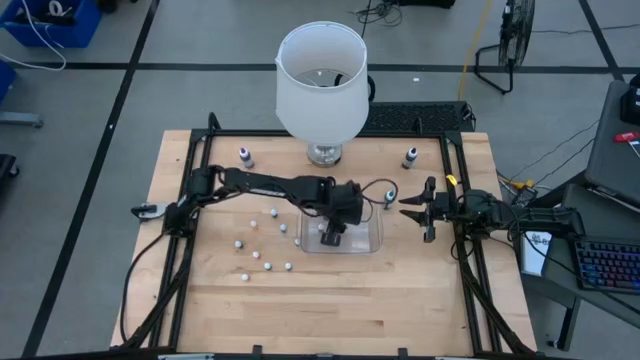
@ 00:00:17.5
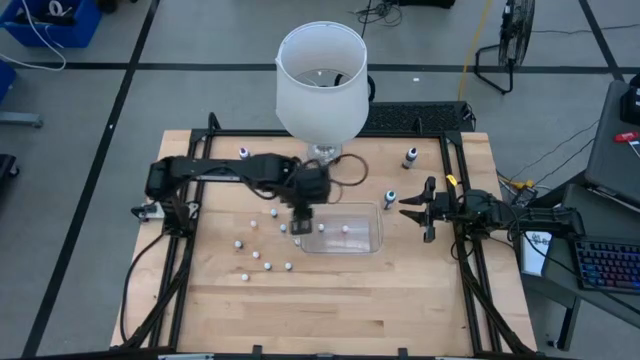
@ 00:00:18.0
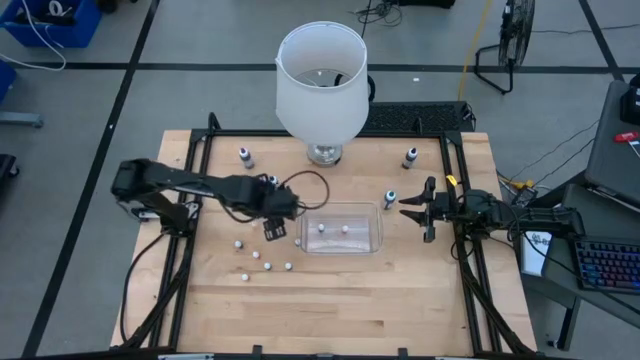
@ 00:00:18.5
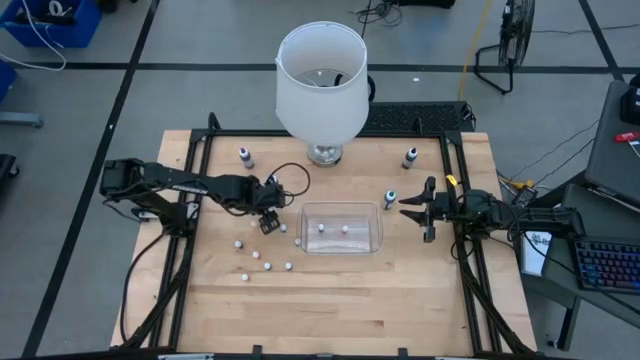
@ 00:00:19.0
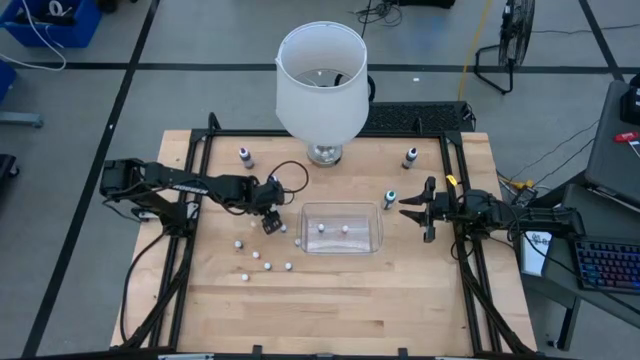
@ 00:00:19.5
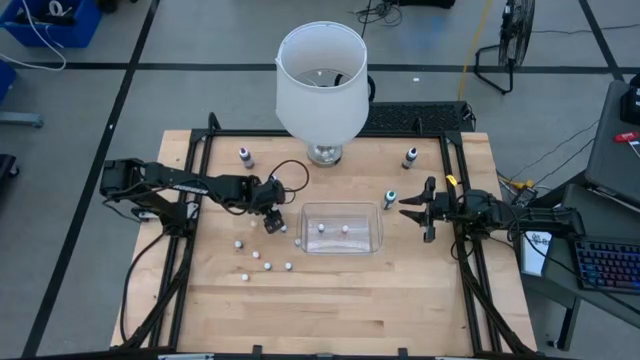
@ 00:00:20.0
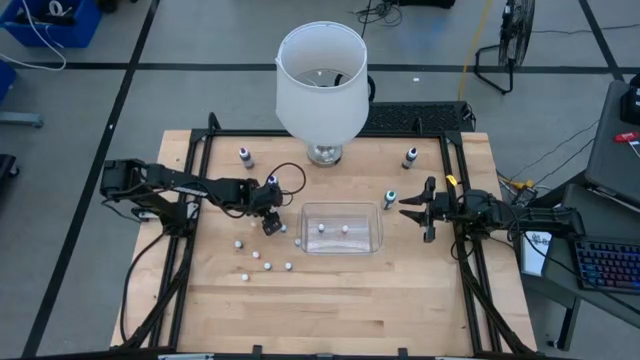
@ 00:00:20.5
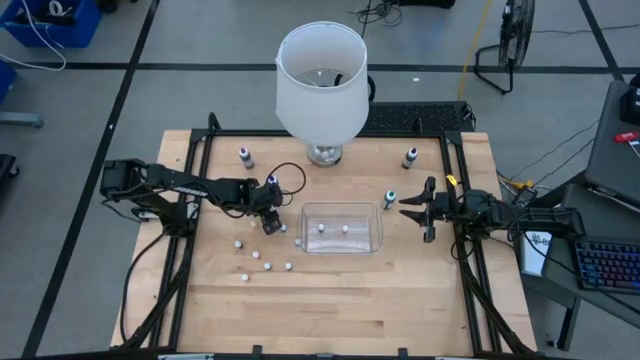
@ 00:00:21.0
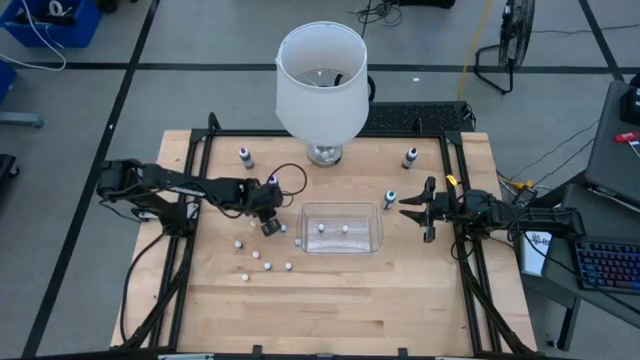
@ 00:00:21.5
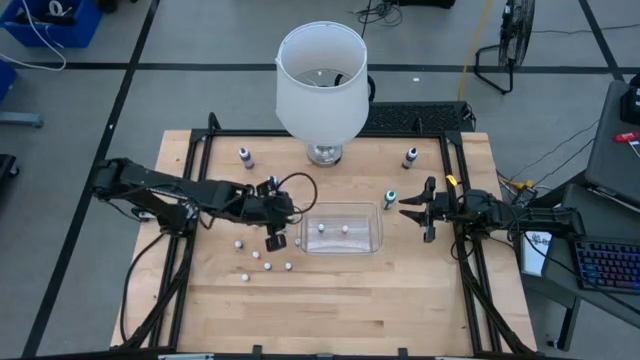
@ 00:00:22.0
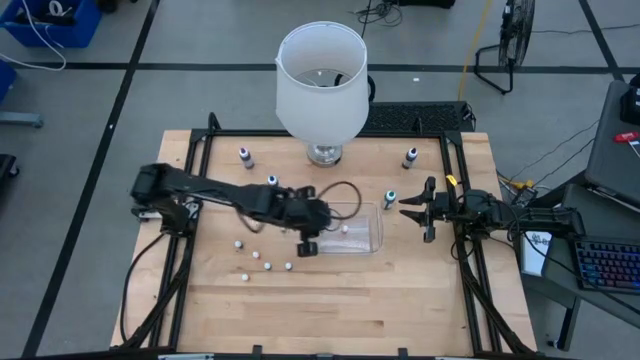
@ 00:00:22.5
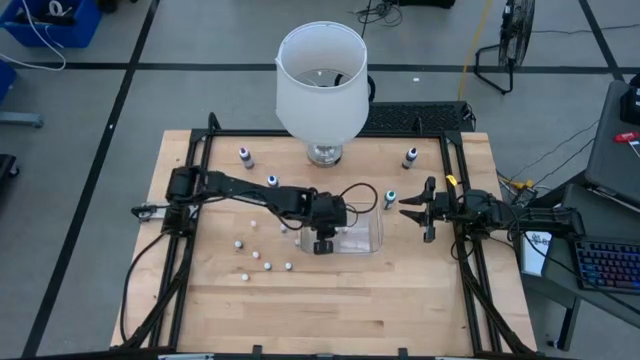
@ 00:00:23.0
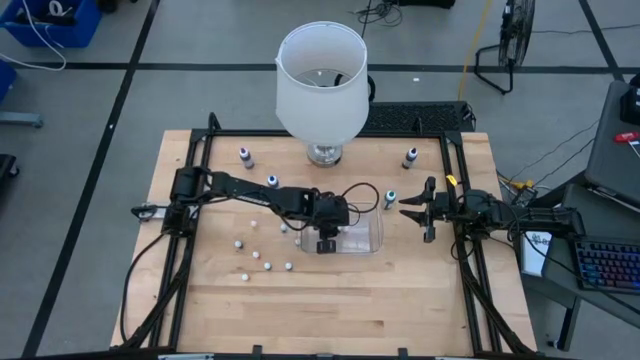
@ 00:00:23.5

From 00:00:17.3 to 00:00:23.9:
Task: Pick & Place food coloring
Put the small blue food coloring bottle into the transparent bin

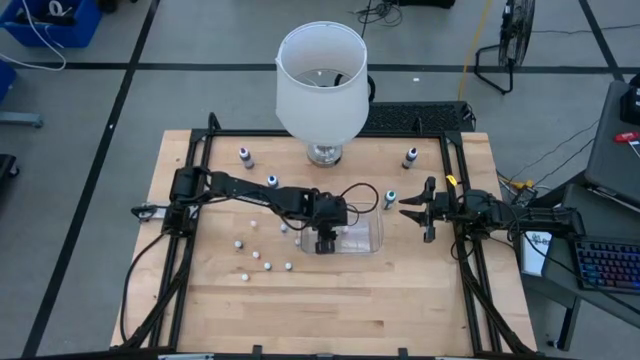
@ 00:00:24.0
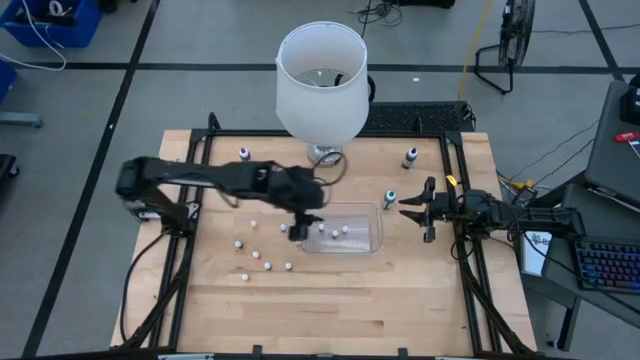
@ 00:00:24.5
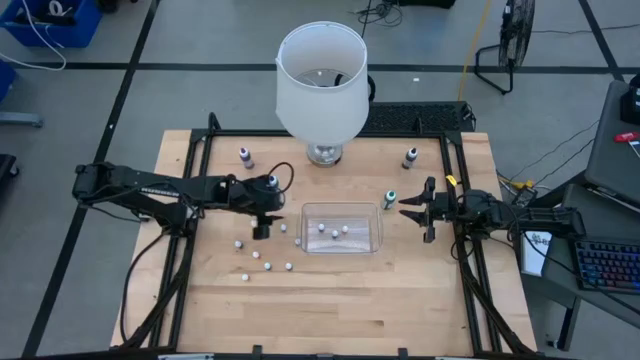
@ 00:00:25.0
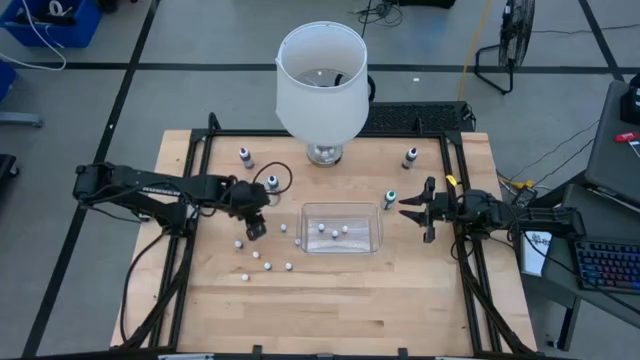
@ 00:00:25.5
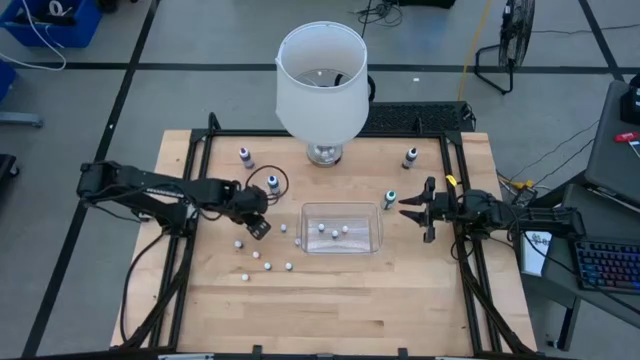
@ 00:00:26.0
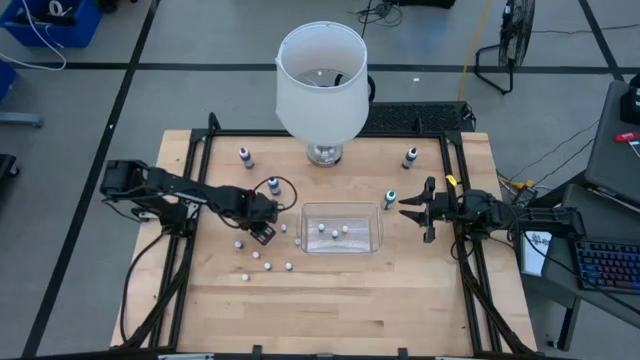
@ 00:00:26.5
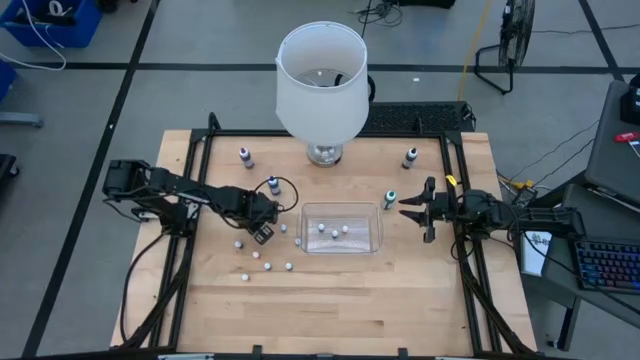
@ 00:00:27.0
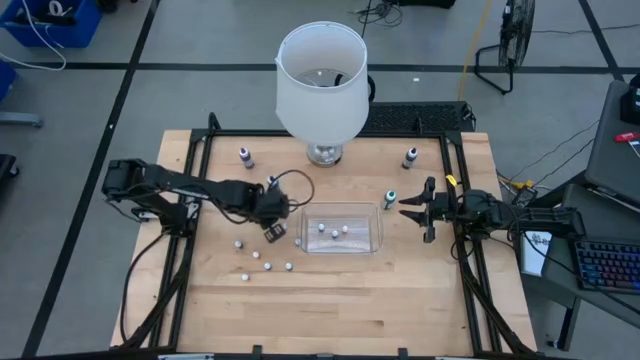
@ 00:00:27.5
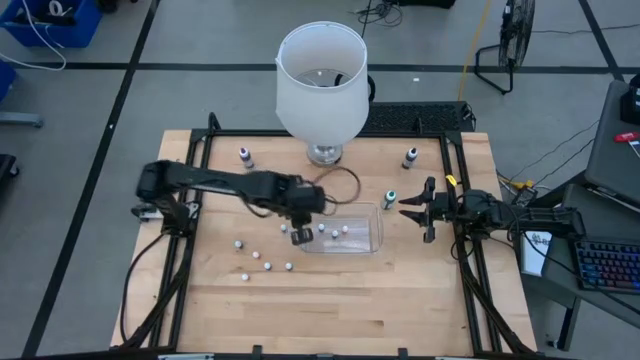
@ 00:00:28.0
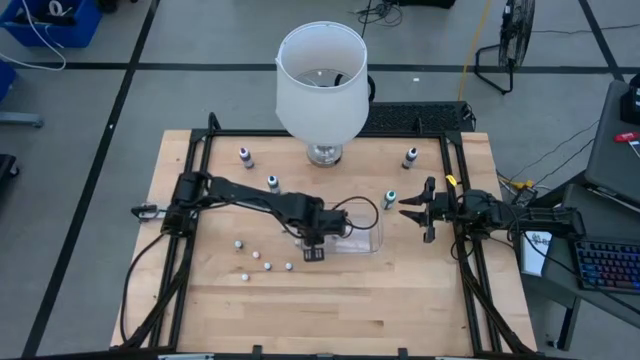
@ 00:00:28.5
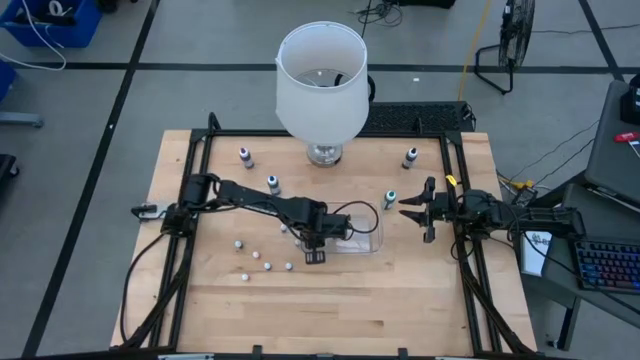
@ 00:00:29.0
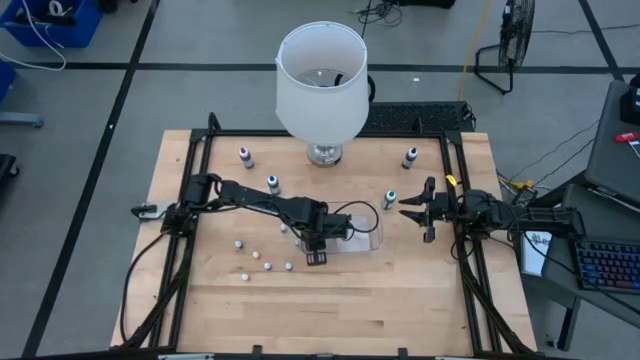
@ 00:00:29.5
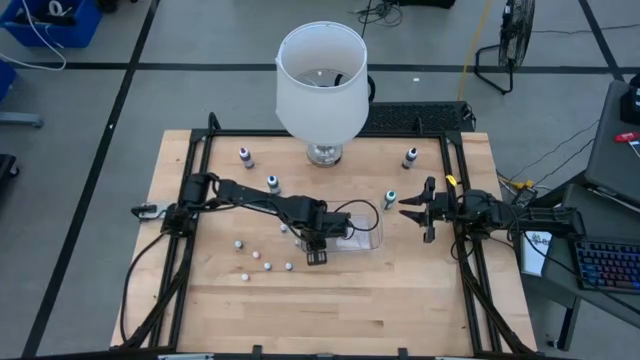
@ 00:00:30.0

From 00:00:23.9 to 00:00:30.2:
Put the yellow food coloring bottle into the transparent bin

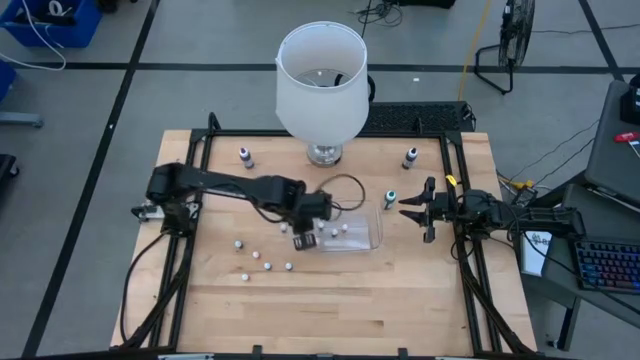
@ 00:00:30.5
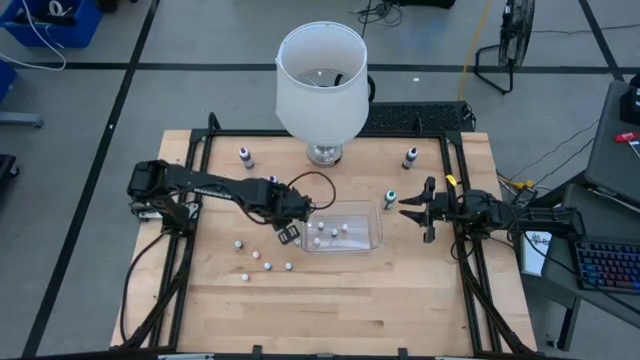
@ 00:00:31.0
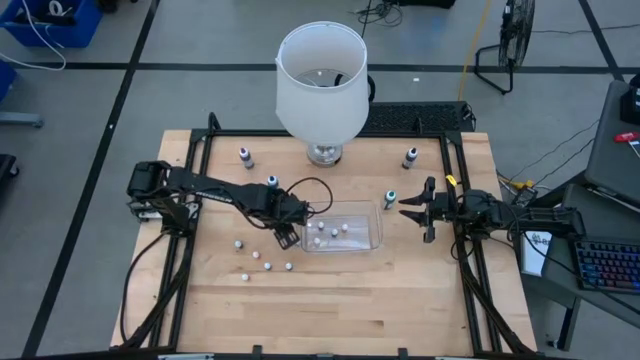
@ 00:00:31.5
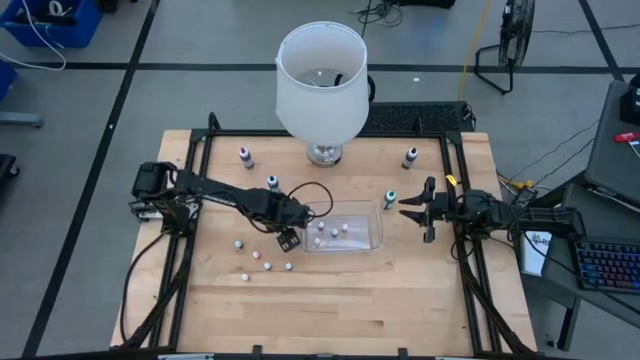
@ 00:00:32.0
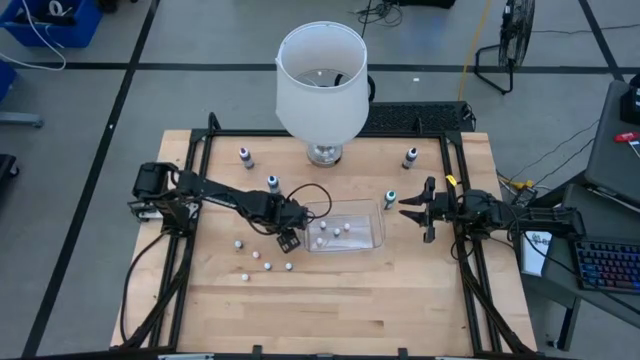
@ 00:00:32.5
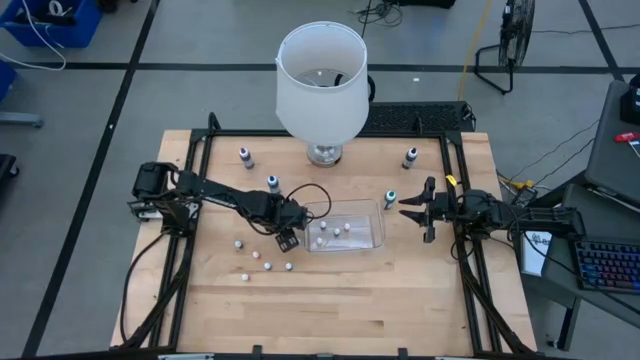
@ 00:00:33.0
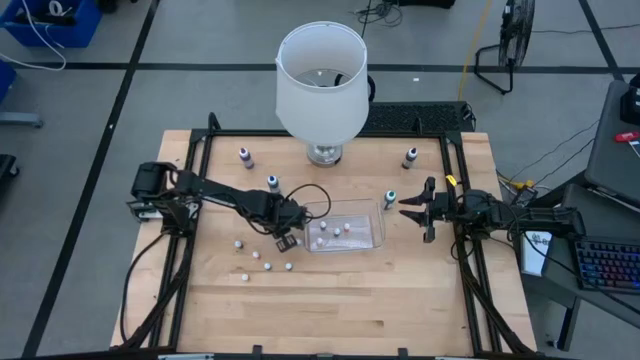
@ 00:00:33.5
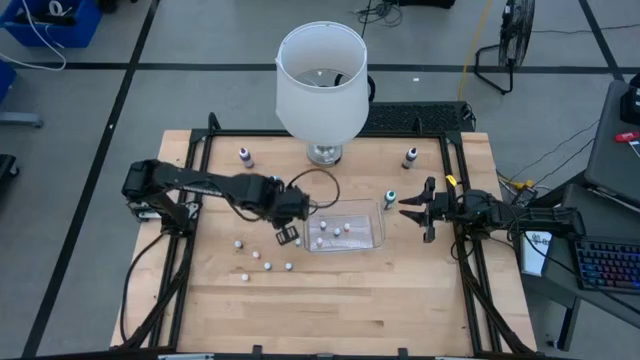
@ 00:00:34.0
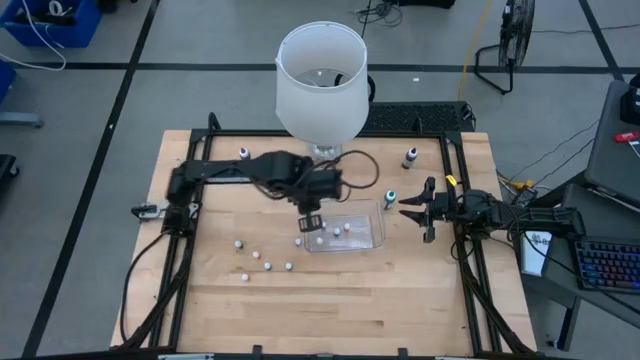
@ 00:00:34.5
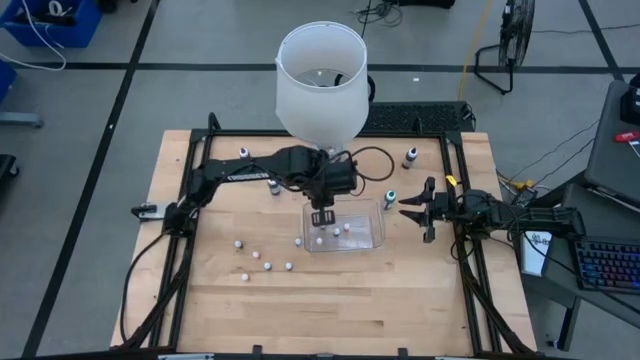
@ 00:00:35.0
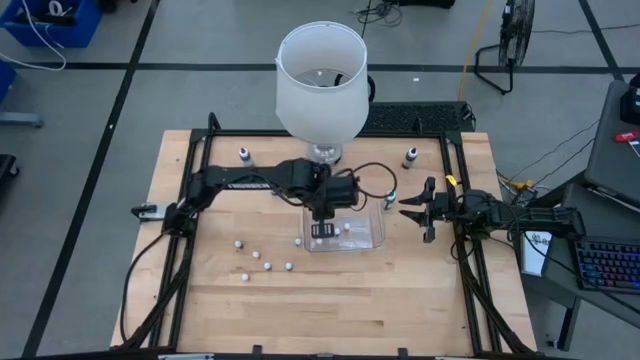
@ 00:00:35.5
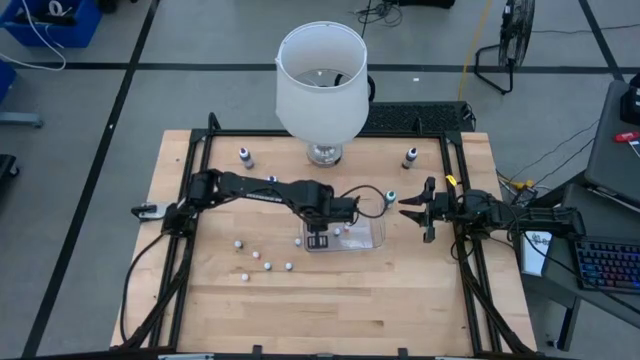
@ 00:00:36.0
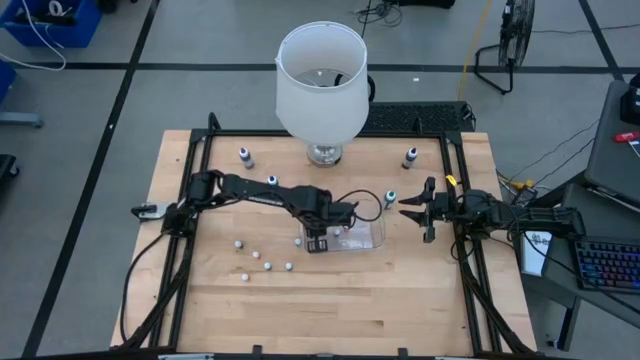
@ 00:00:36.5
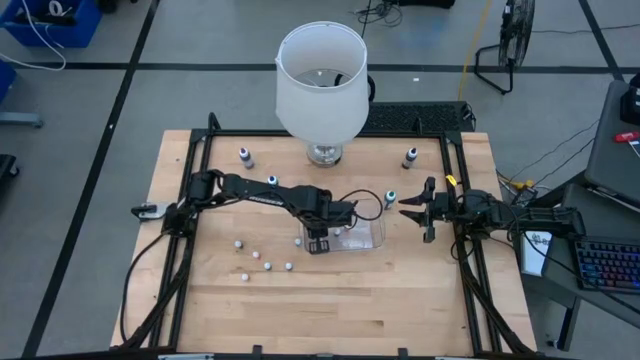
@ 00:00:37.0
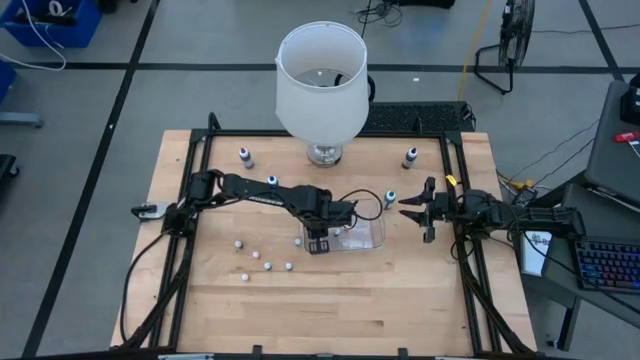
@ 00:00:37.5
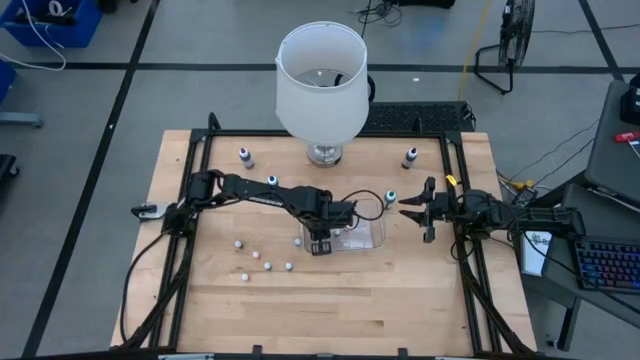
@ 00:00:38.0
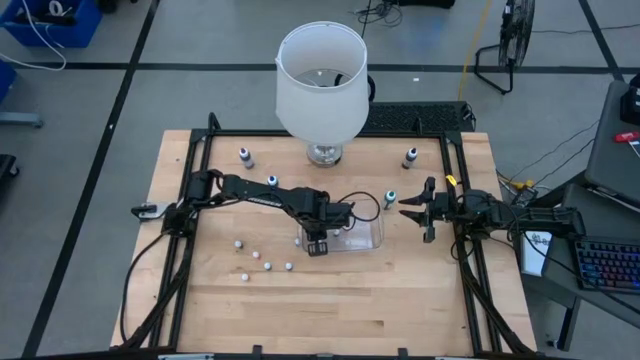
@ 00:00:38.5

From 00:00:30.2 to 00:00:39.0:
Put the small green food coloring bottle into the transparent bin
